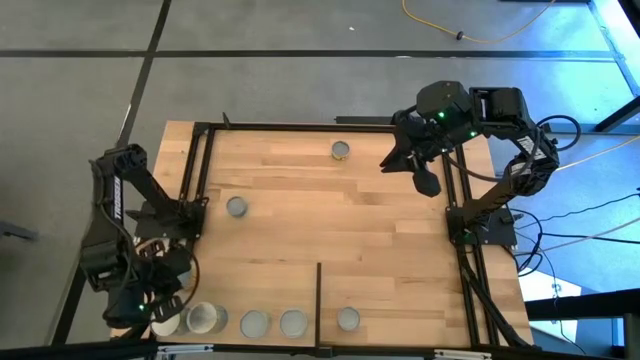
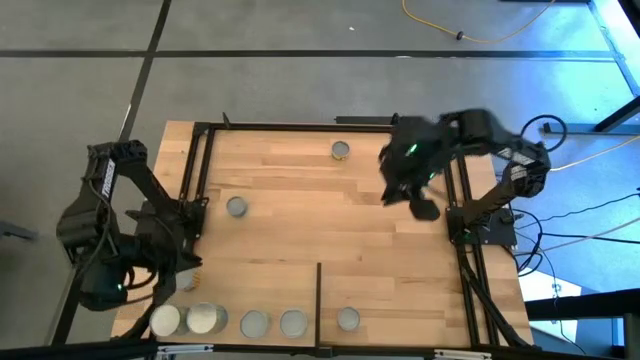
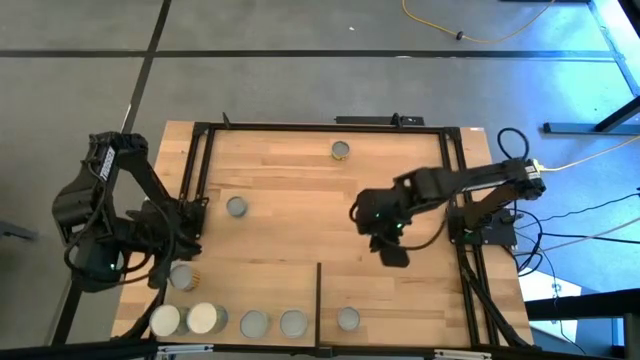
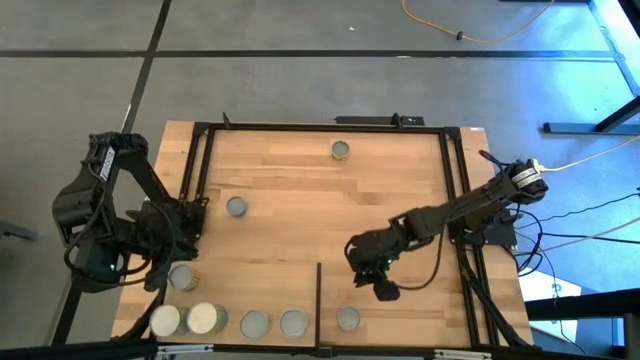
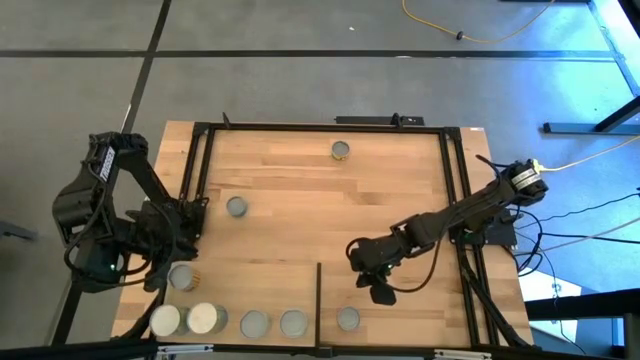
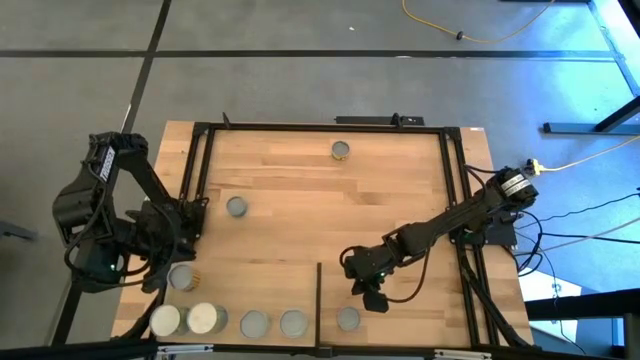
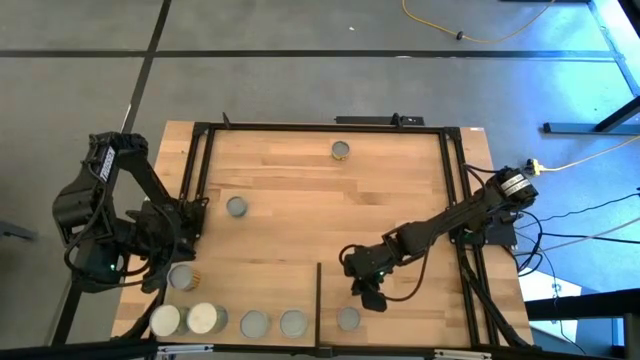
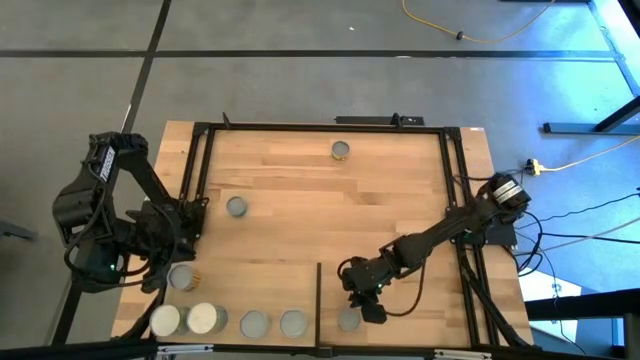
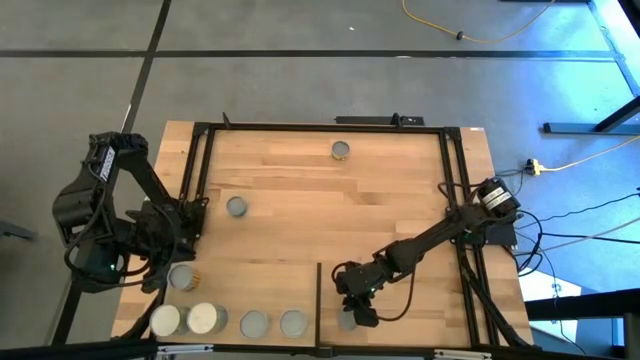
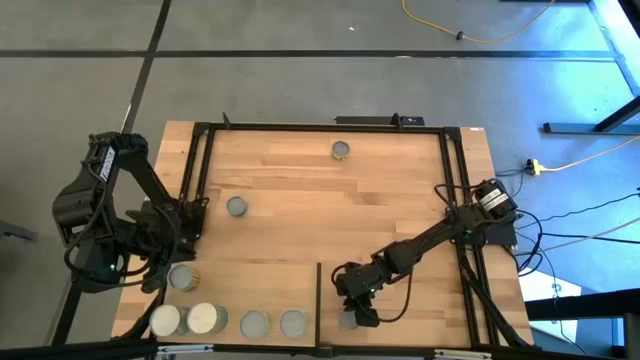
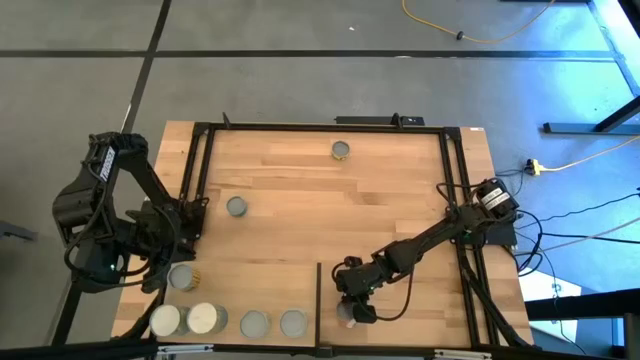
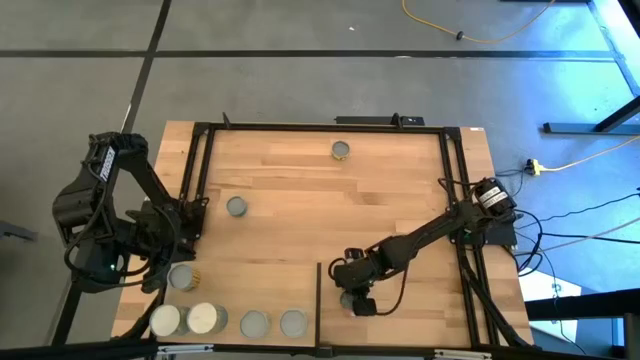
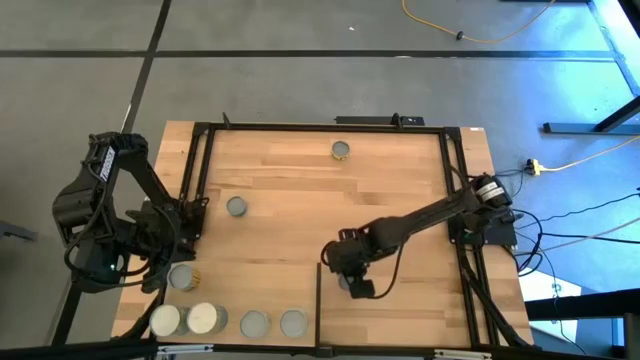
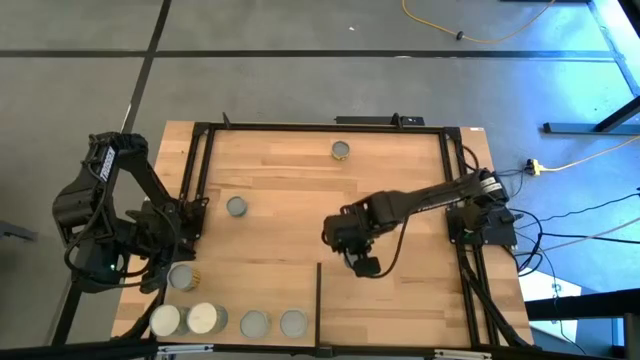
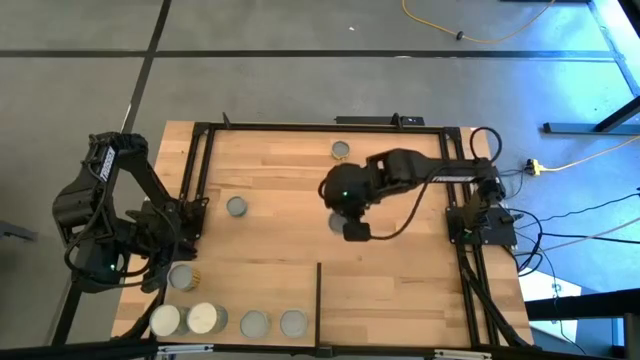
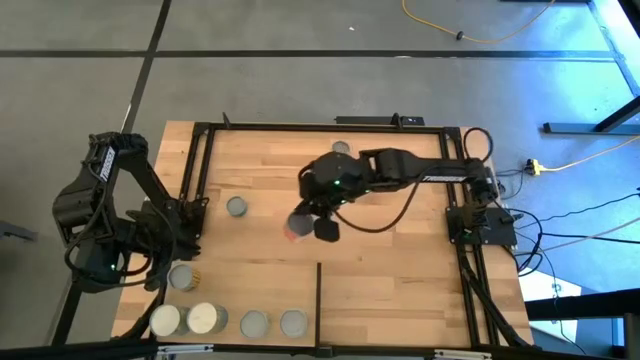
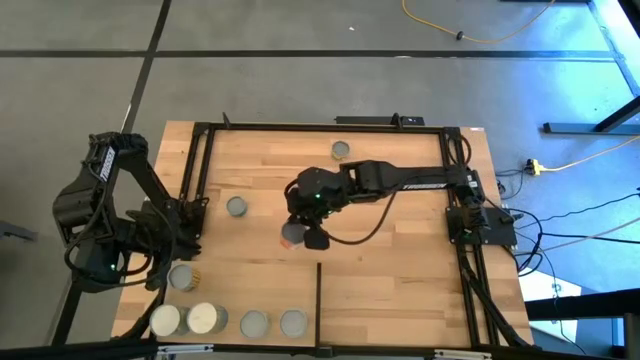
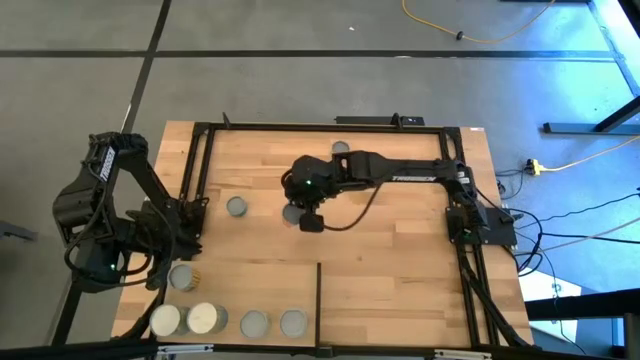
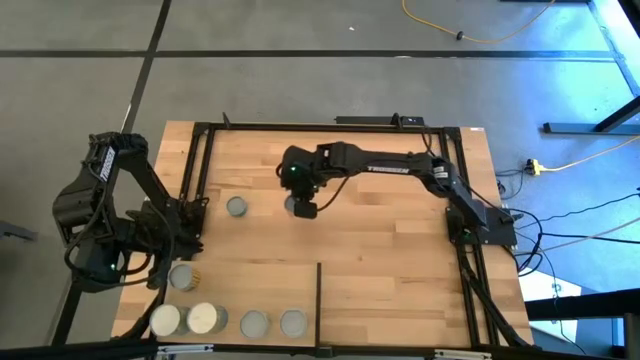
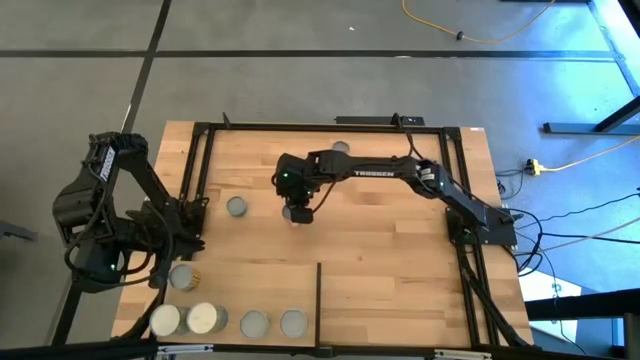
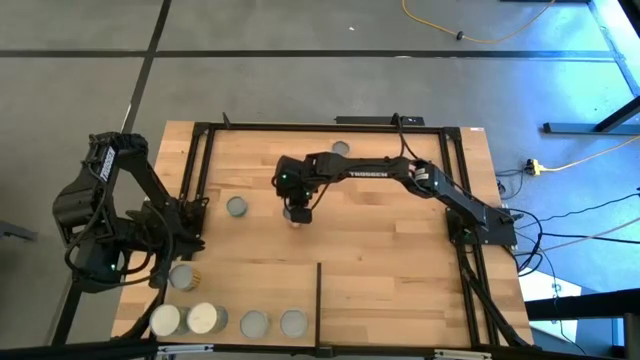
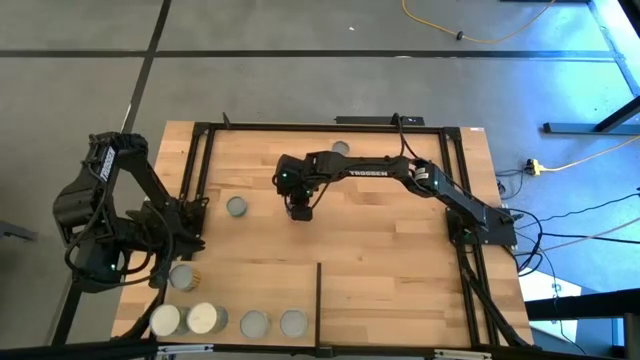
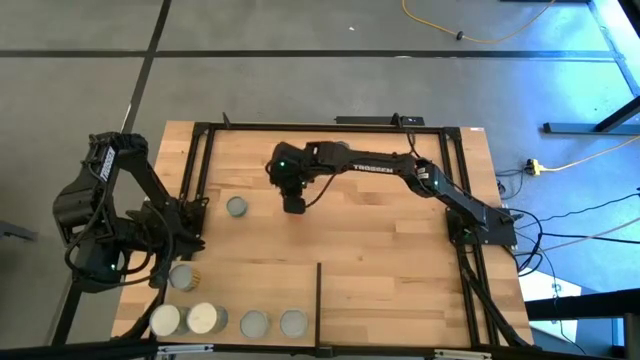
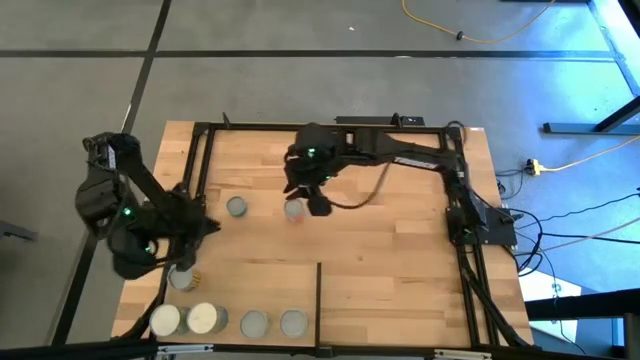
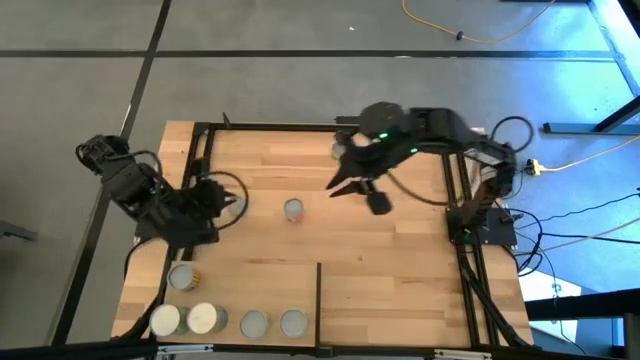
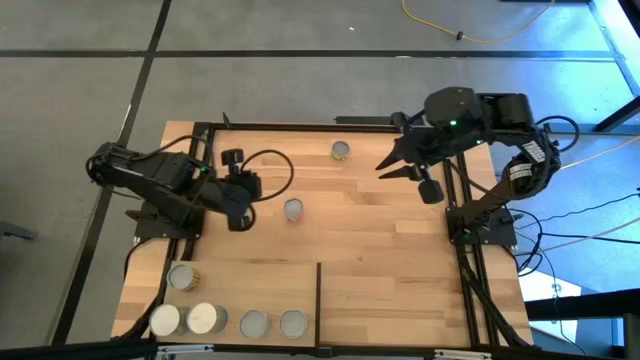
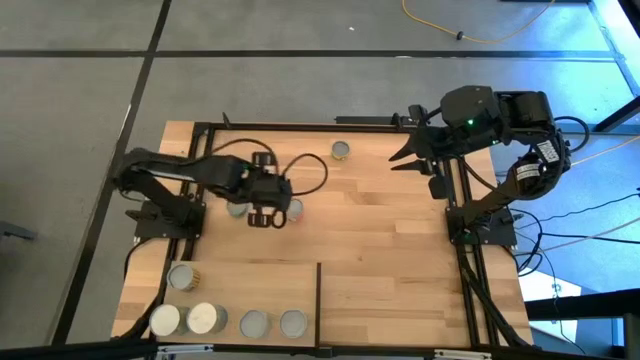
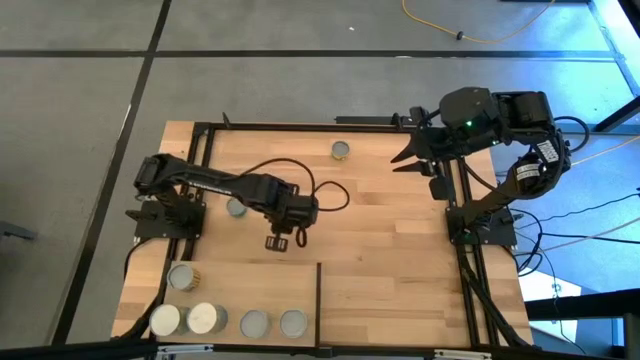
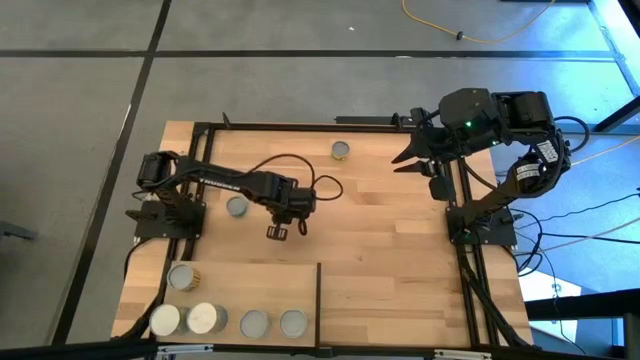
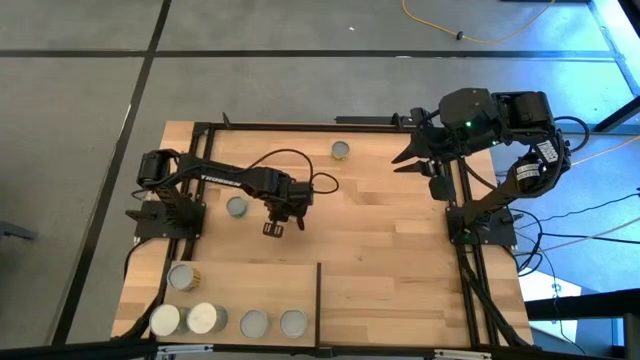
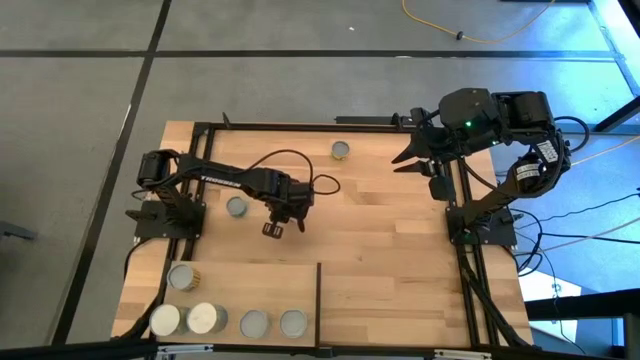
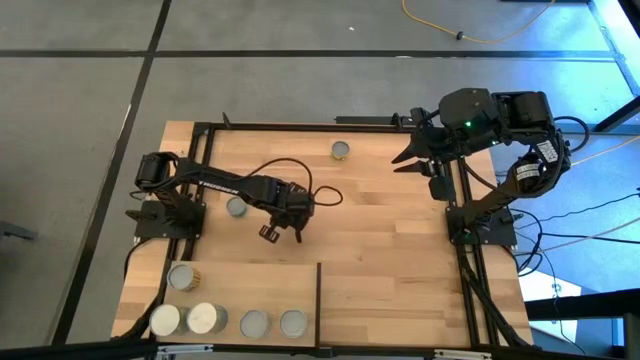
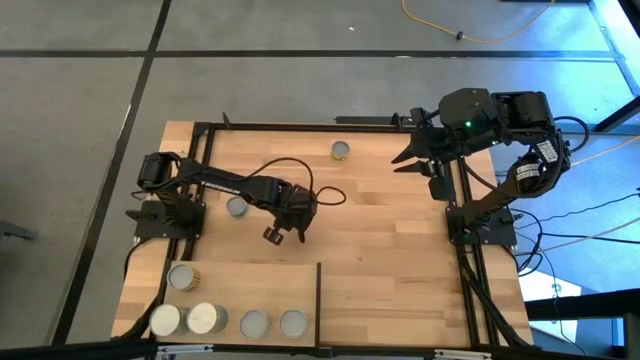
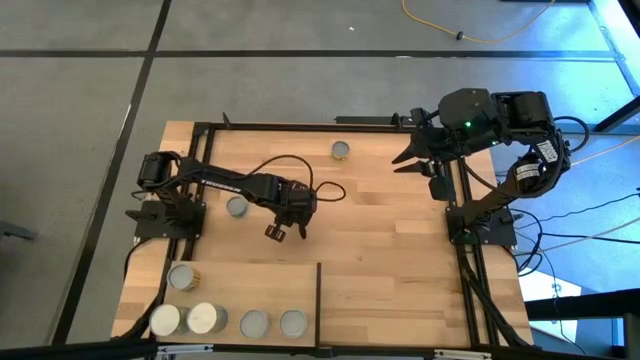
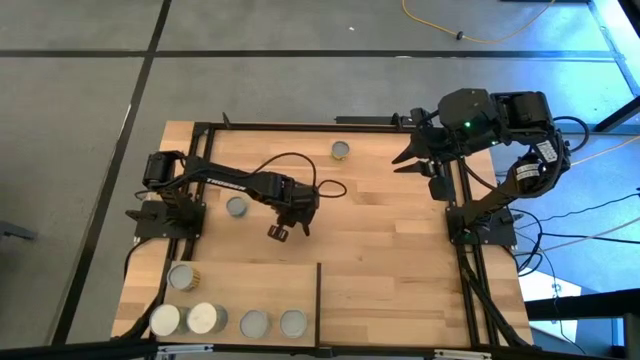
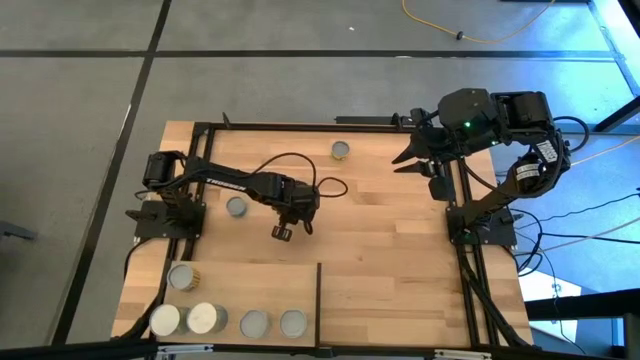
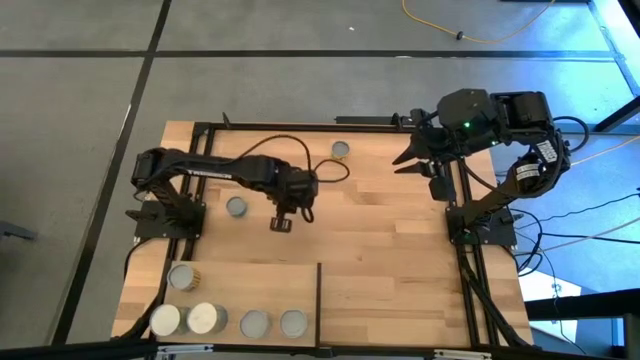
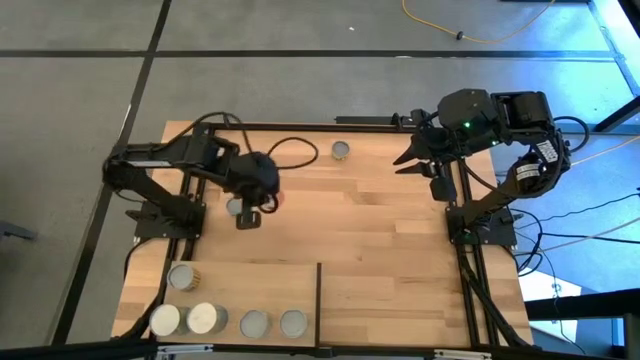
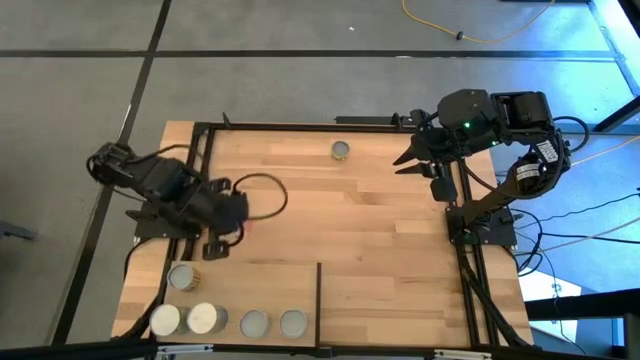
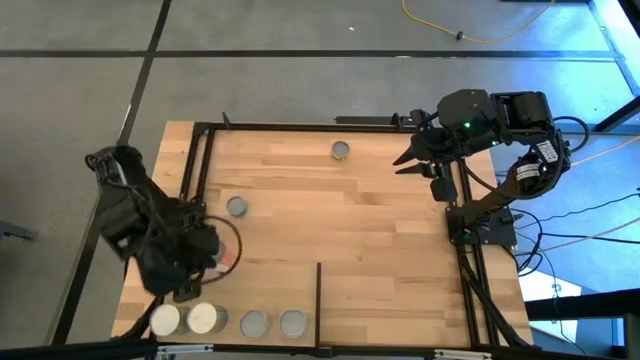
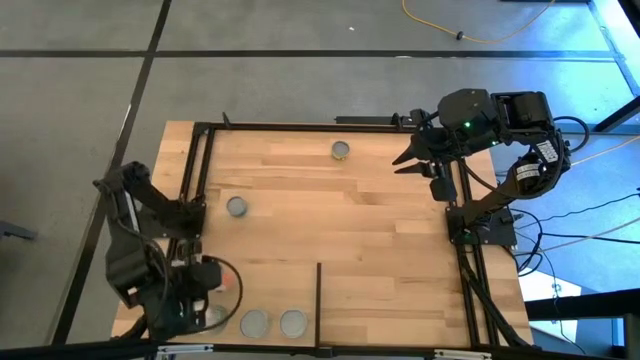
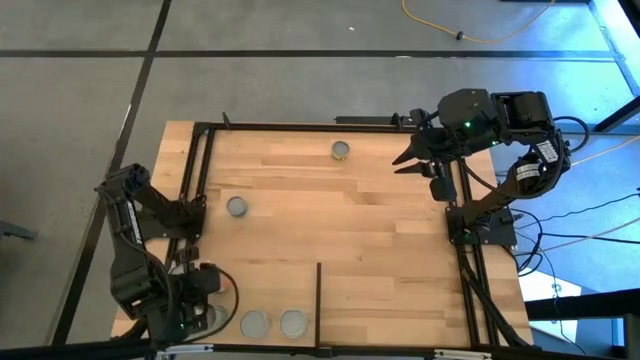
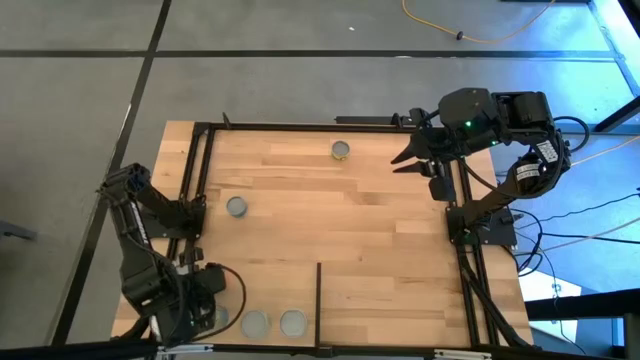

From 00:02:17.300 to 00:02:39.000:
Task: Pick and place cans onto a shelf
Put the orange can on the shelf

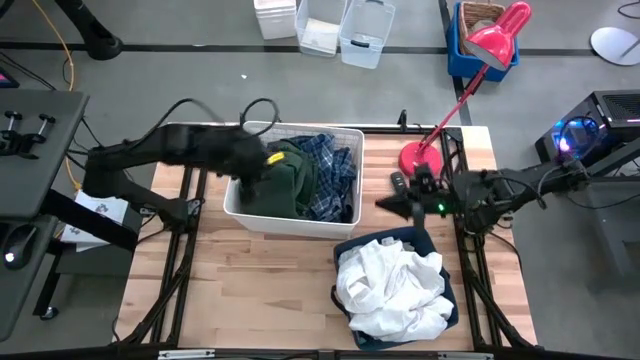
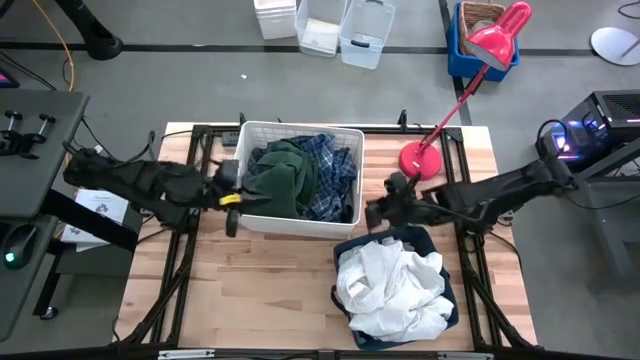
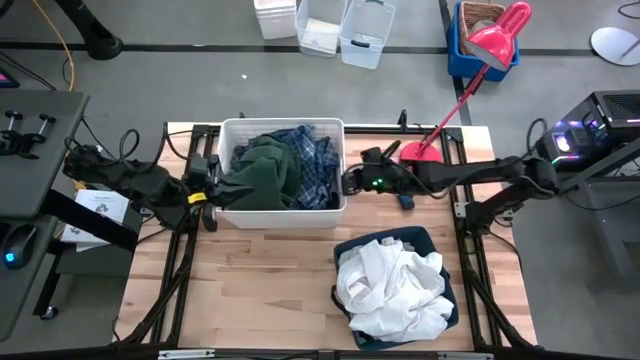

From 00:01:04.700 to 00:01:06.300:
Task: Sort clothes
Adjust the white laundry bin
